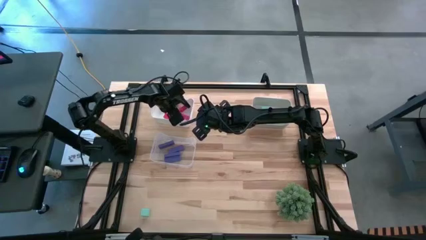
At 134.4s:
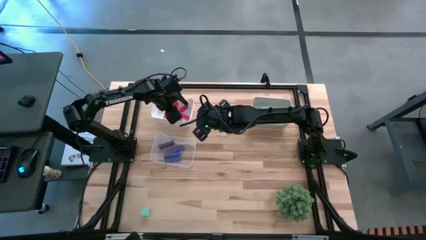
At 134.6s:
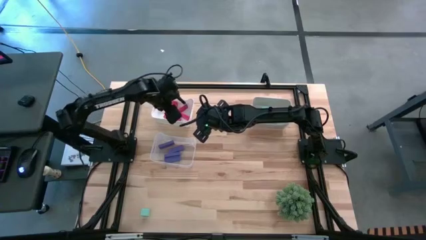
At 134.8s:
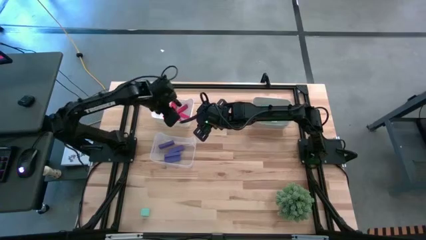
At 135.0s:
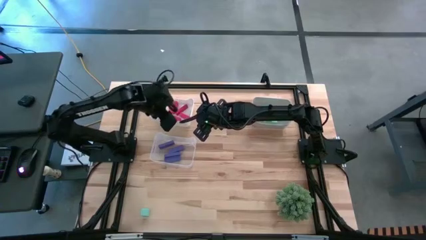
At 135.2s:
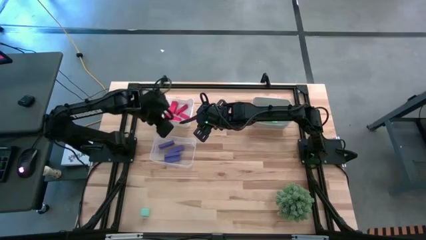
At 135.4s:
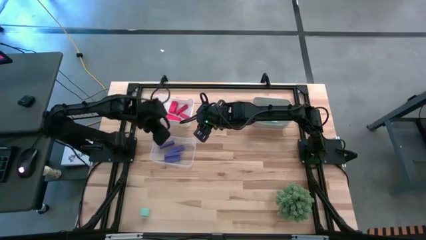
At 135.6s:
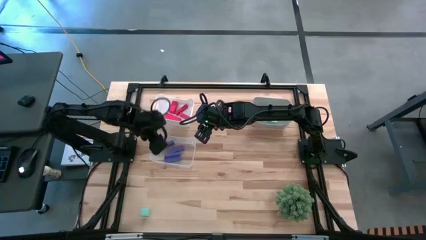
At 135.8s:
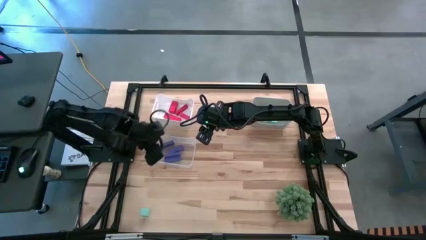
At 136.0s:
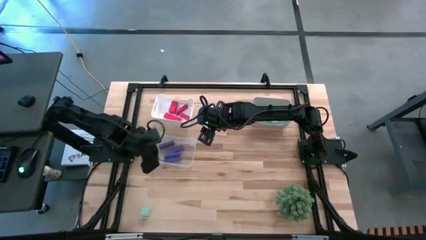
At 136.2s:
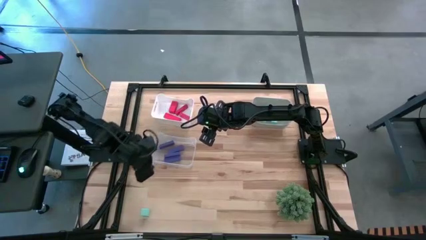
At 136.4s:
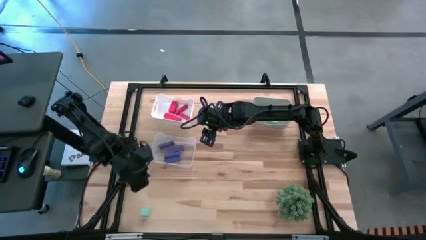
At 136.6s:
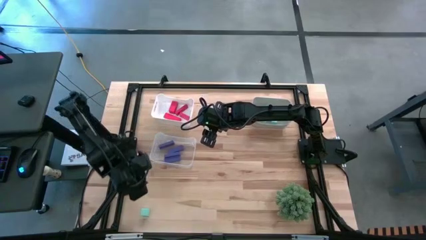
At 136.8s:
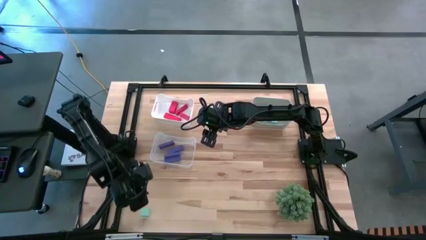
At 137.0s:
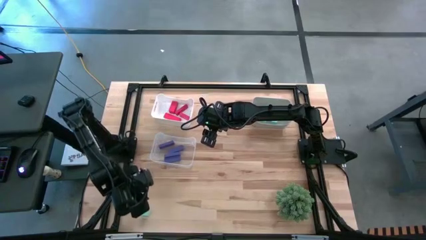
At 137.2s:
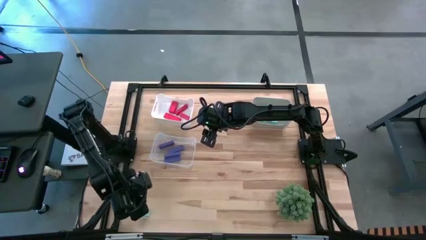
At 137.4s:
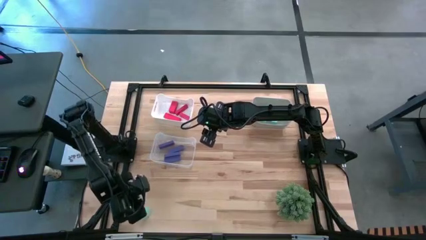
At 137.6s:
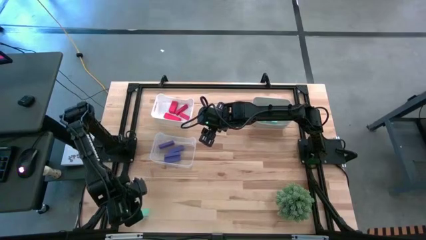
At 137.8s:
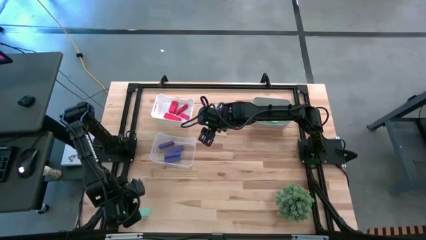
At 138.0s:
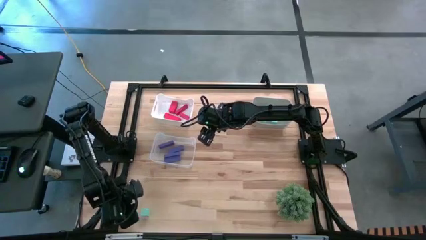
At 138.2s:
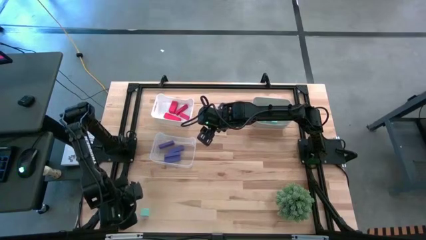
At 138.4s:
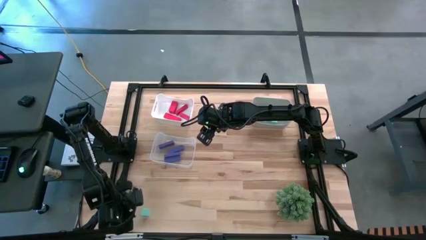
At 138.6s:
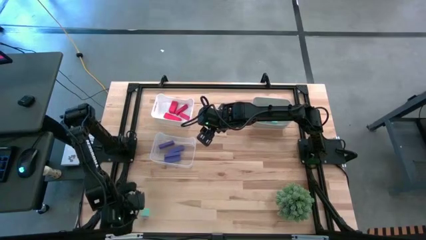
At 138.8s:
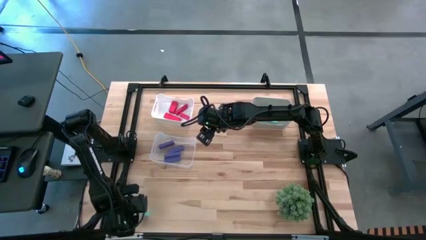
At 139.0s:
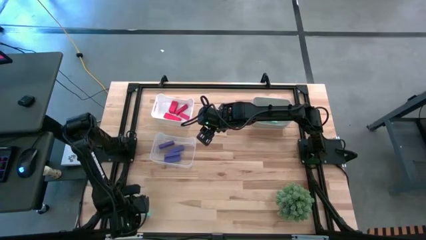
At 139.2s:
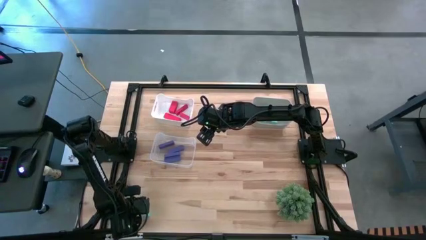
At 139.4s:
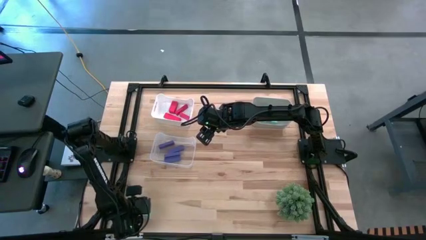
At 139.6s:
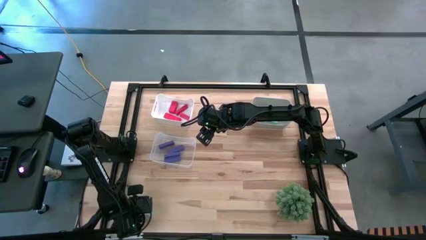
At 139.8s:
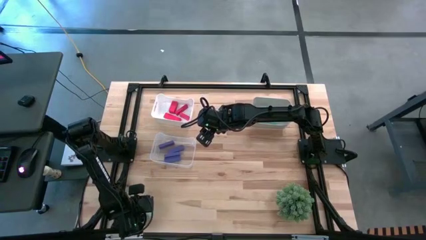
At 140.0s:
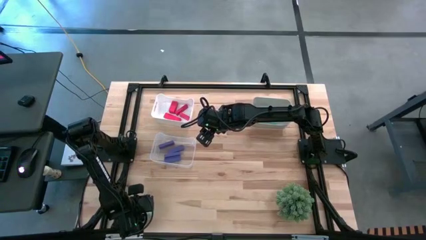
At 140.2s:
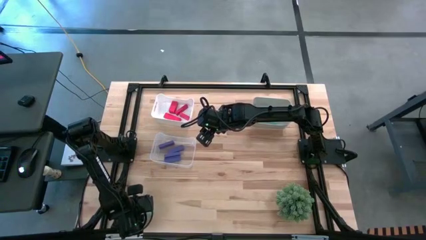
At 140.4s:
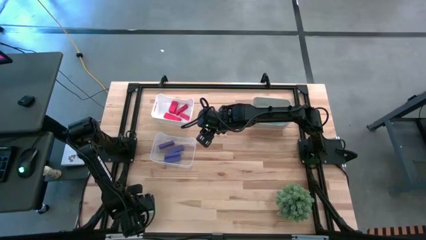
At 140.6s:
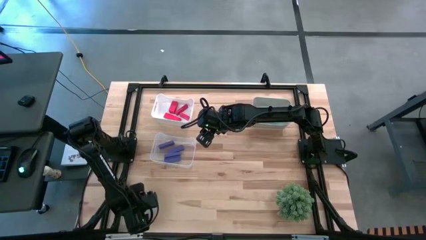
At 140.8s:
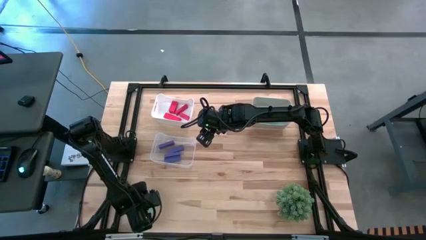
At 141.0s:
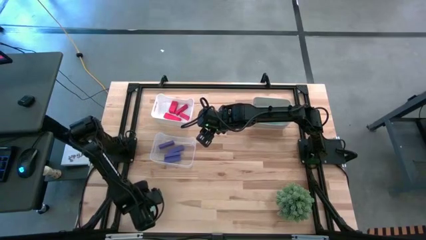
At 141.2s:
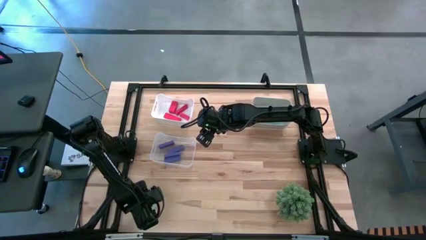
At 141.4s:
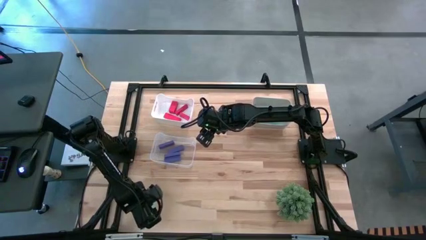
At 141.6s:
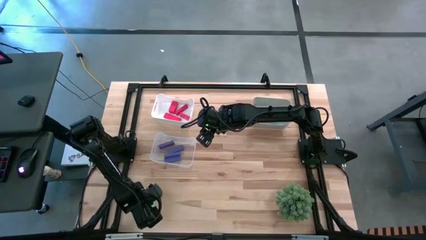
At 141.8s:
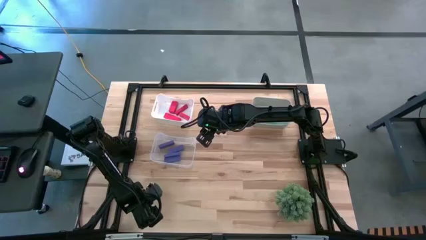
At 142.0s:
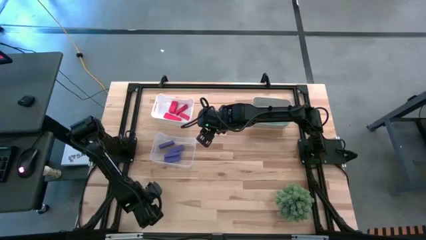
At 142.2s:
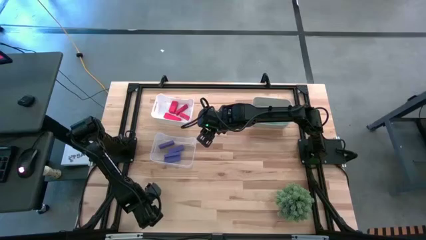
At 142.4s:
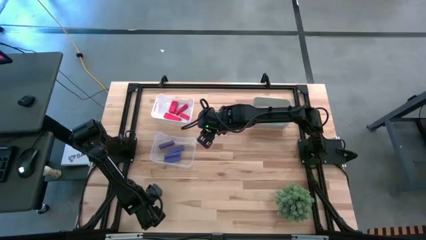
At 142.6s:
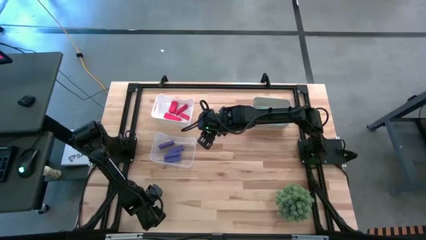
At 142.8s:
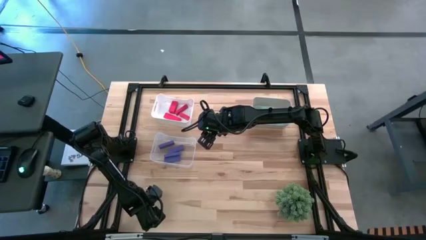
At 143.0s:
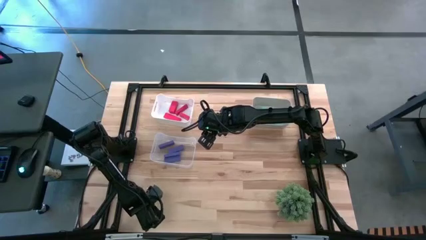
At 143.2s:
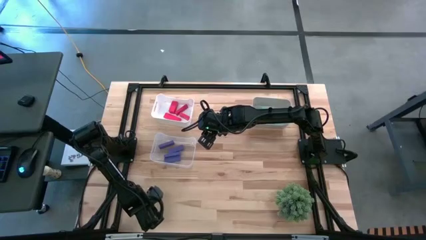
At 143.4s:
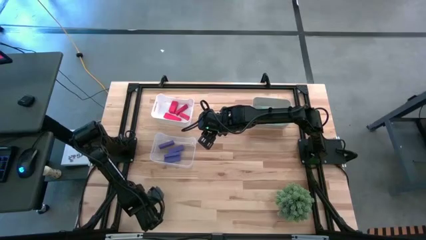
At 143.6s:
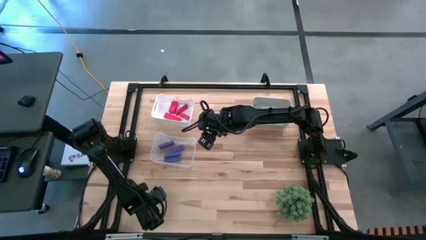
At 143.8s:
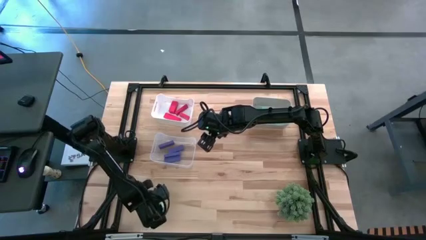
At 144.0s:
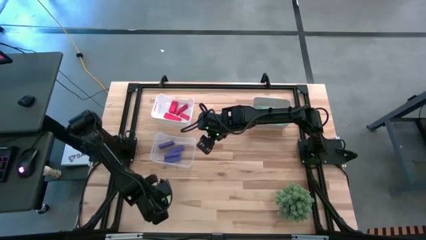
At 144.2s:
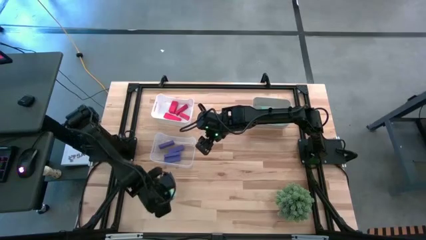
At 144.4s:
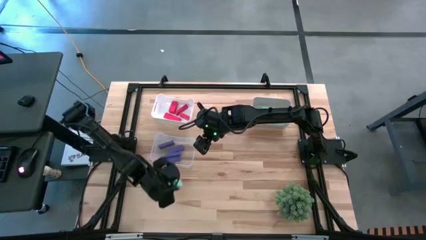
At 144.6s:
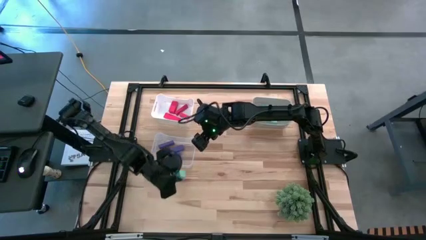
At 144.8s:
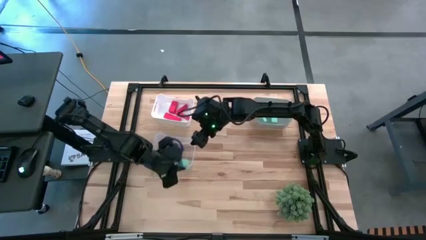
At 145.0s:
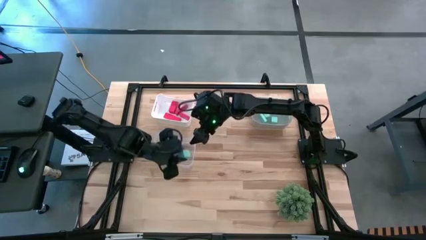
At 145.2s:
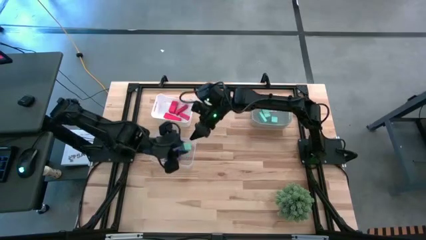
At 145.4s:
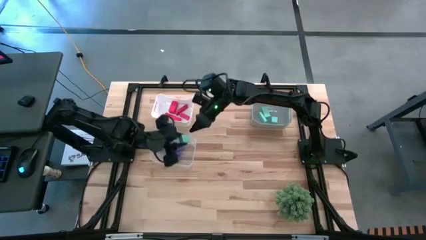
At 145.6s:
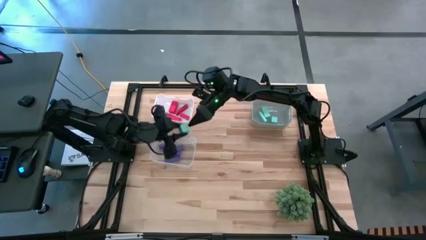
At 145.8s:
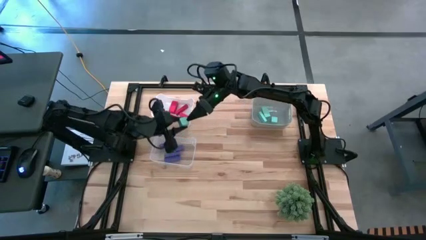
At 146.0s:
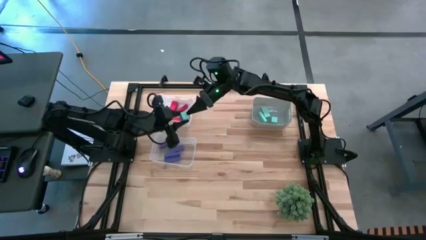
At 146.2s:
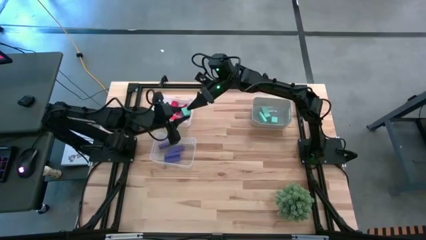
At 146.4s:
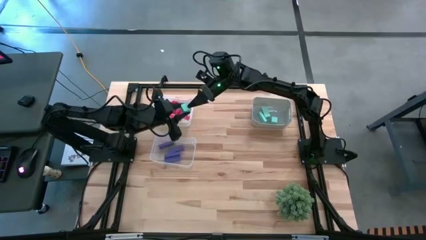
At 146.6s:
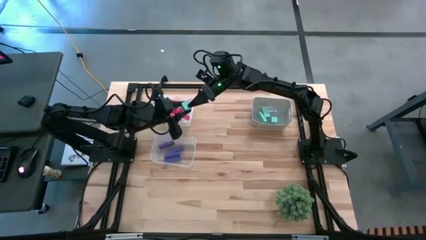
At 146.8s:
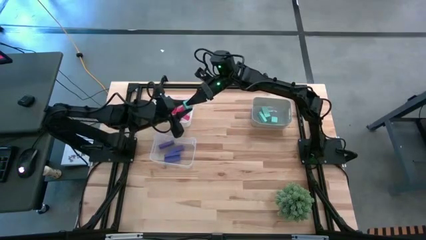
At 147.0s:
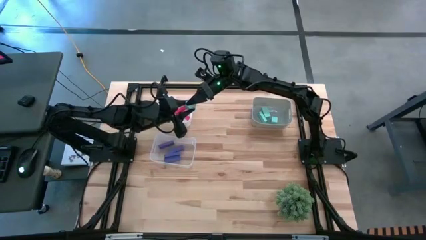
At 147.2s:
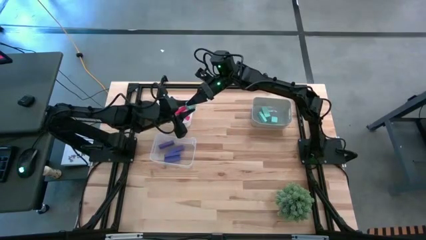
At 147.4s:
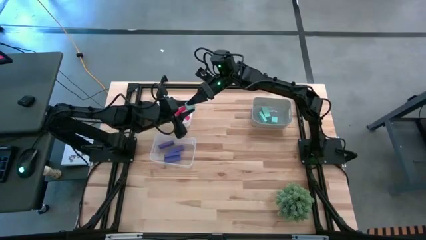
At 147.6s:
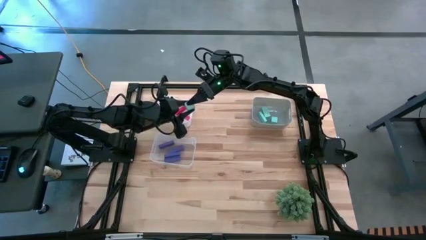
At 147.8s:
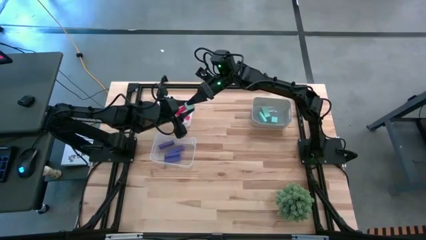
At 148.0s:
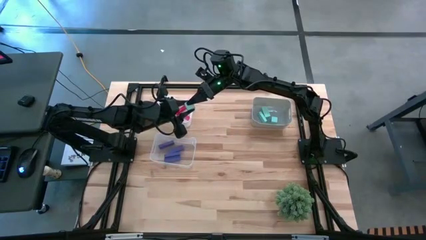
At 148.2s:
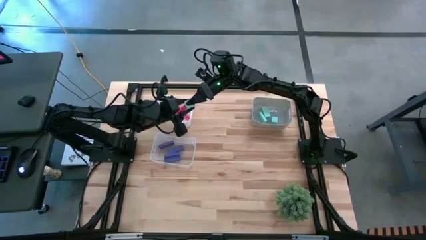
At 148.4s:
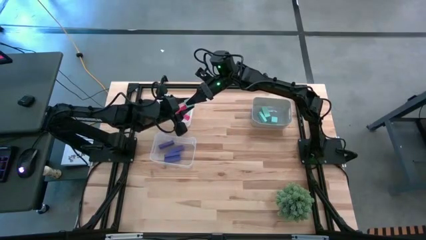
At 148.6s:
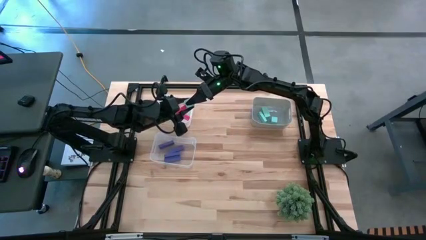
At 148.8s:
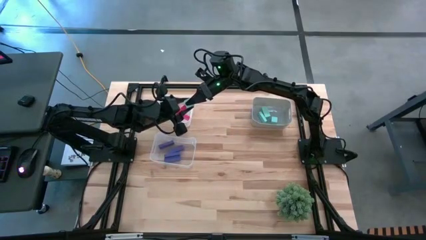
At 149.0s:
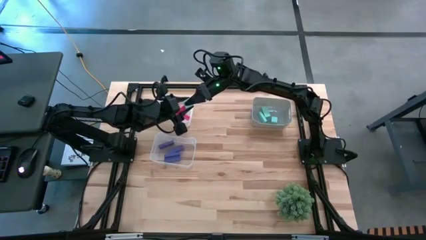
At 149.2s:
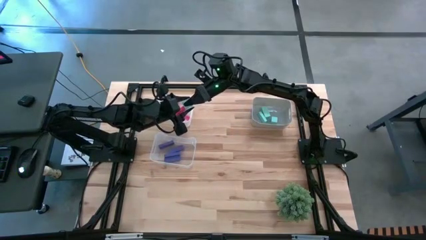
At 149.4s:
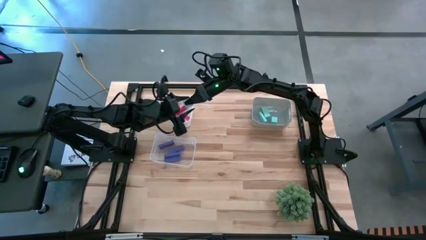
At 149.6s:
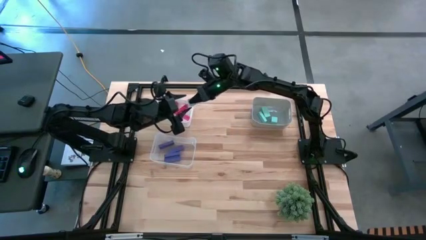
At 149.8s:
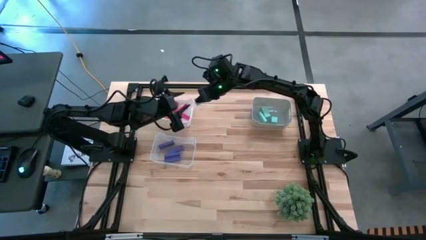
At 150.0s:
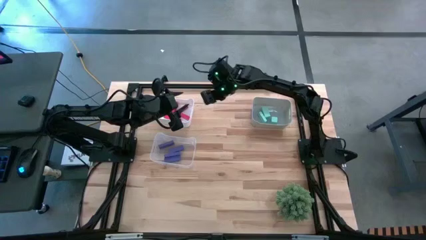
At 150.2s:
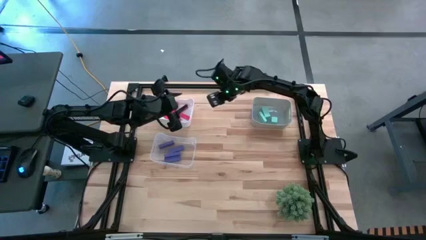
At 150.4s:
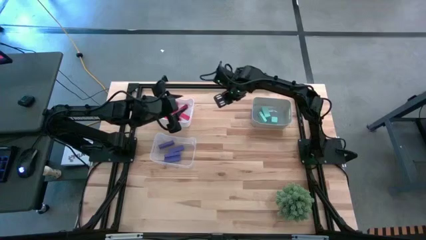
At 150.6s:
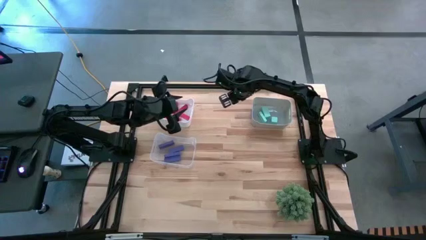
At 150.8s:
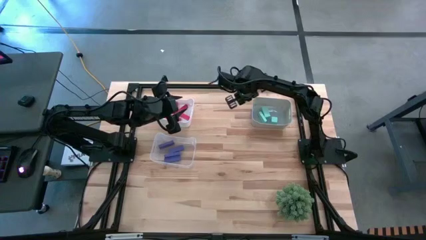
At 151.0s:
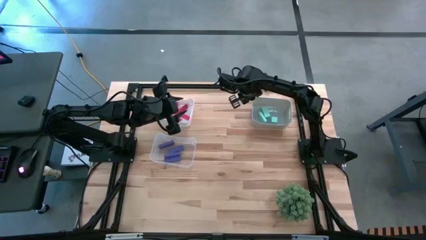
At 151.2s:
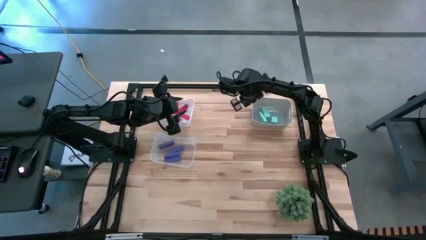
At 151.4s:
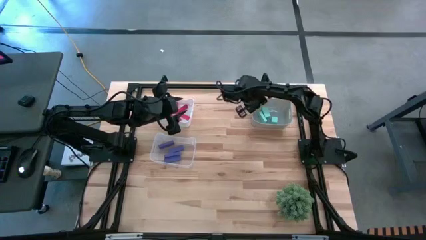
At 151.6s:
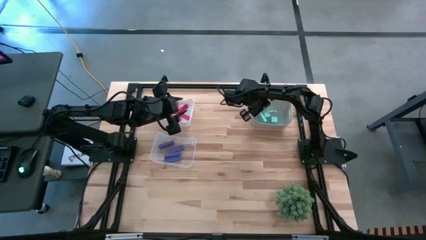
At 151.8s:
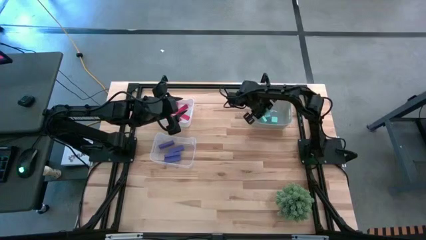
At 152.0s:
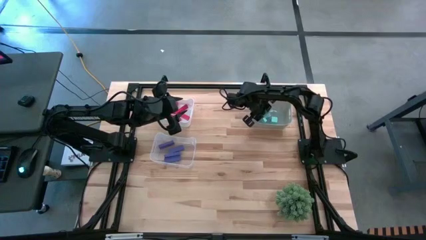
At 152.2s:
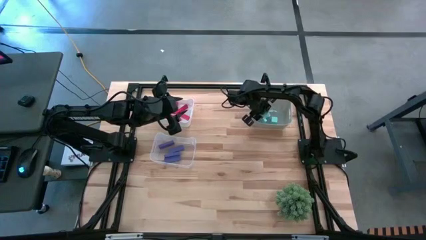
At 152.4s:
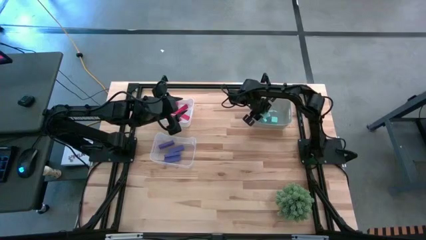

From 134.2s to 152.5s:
Task: Sort & place blocks by color
Put the light blue block into the grey bin
